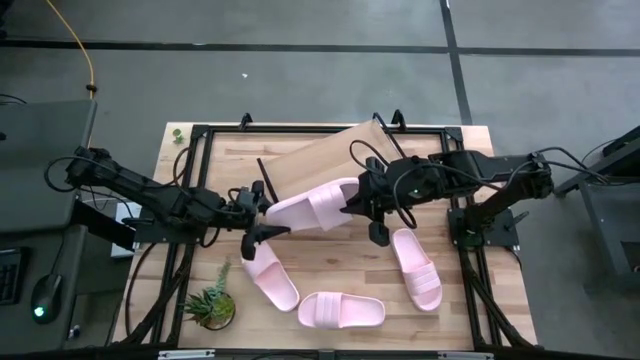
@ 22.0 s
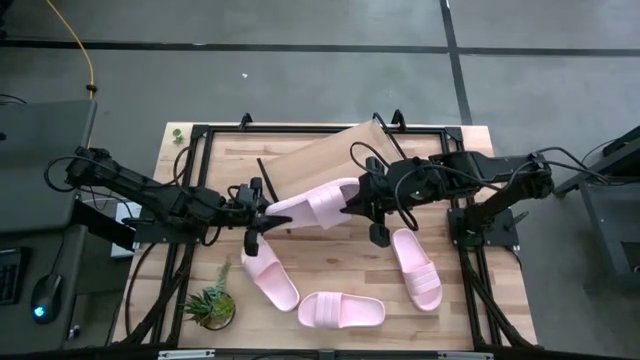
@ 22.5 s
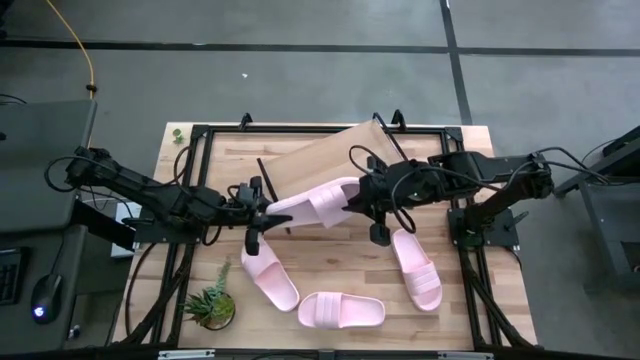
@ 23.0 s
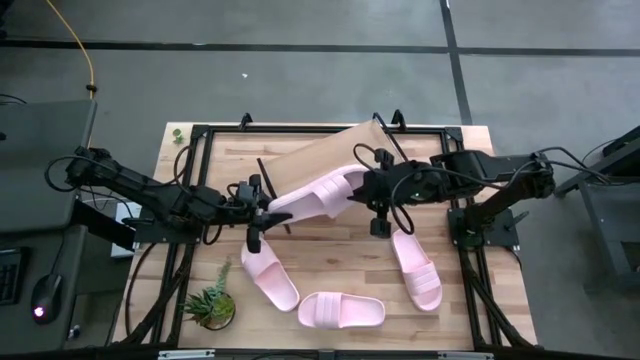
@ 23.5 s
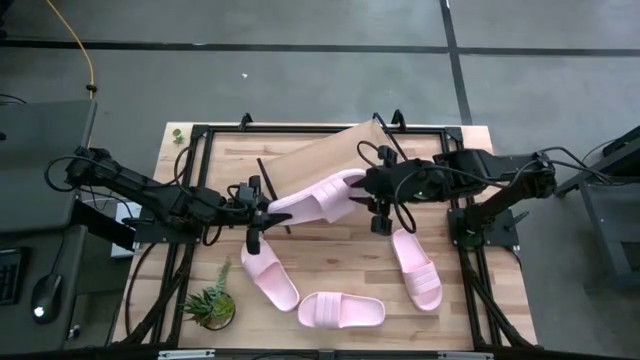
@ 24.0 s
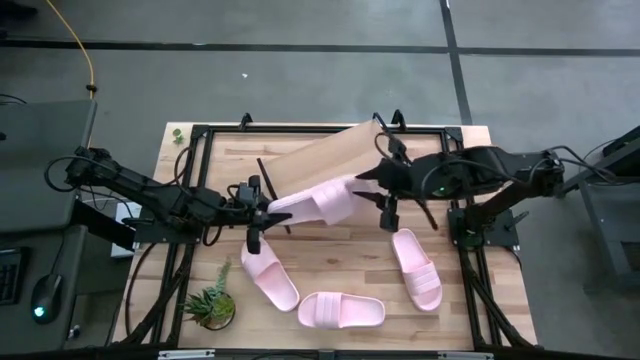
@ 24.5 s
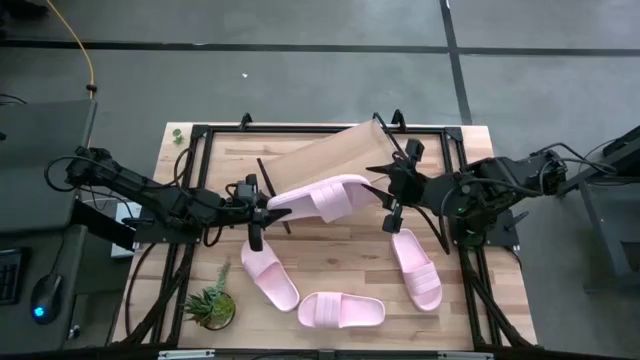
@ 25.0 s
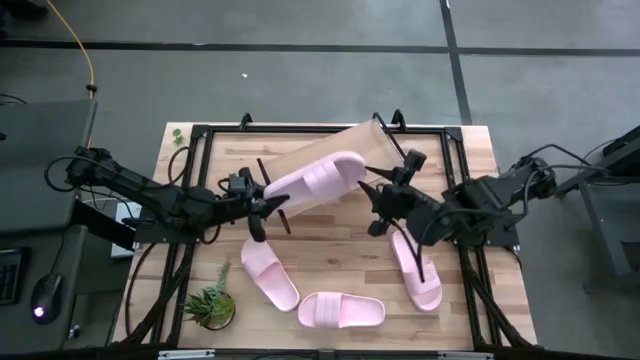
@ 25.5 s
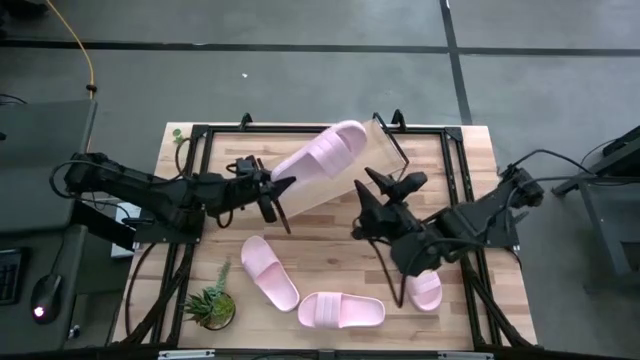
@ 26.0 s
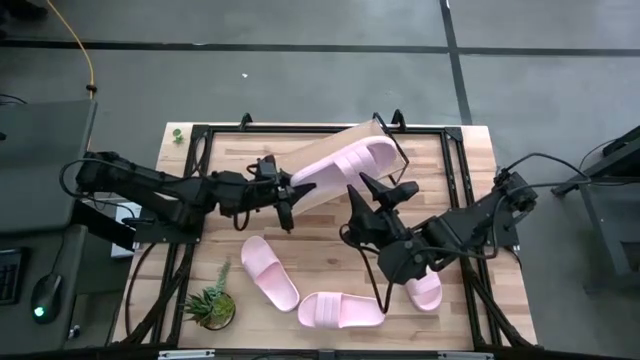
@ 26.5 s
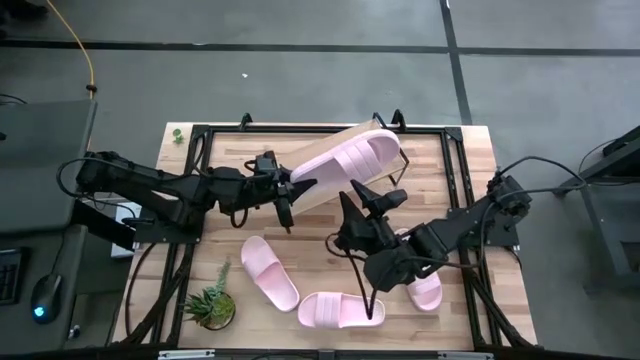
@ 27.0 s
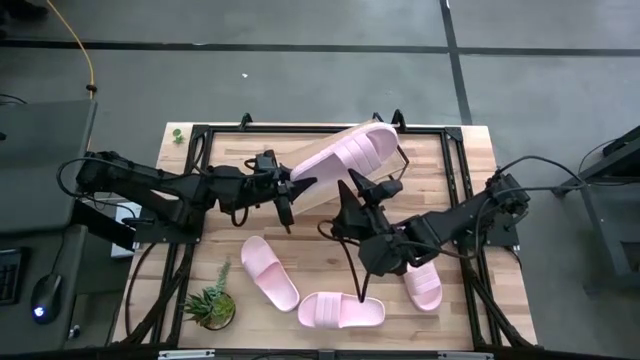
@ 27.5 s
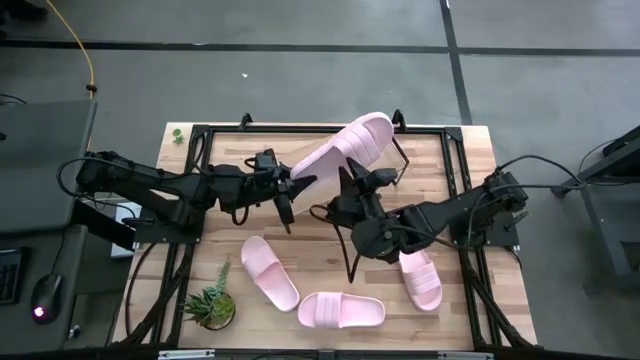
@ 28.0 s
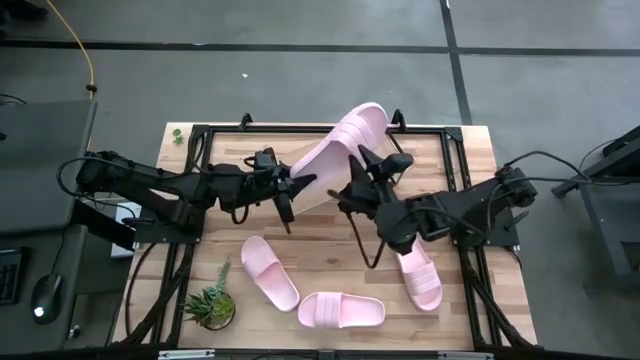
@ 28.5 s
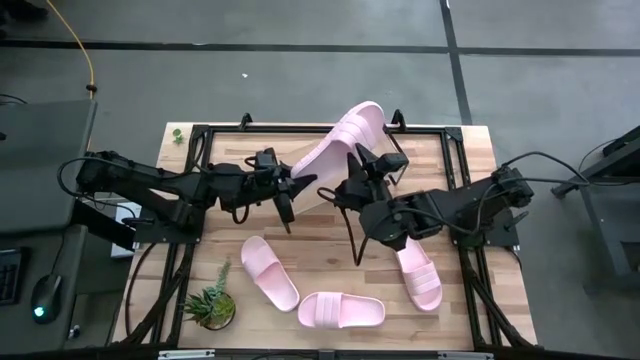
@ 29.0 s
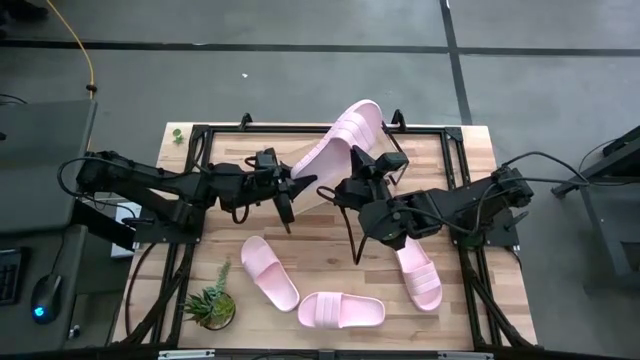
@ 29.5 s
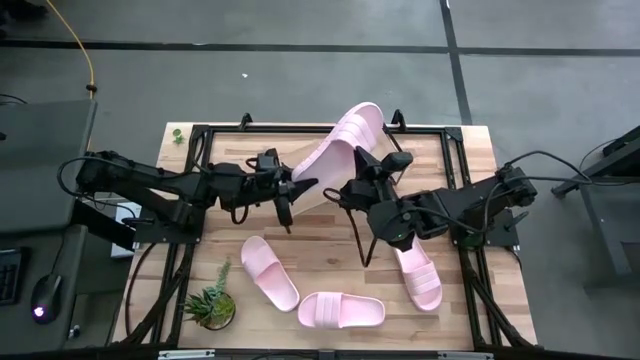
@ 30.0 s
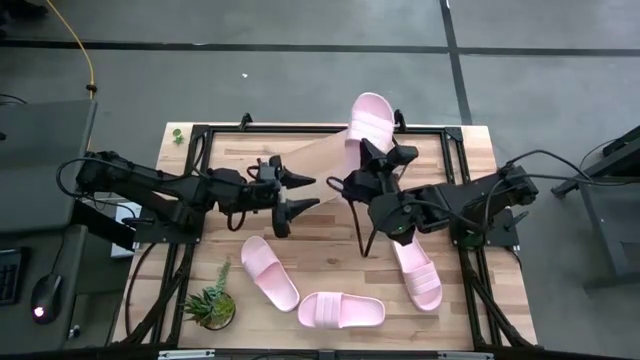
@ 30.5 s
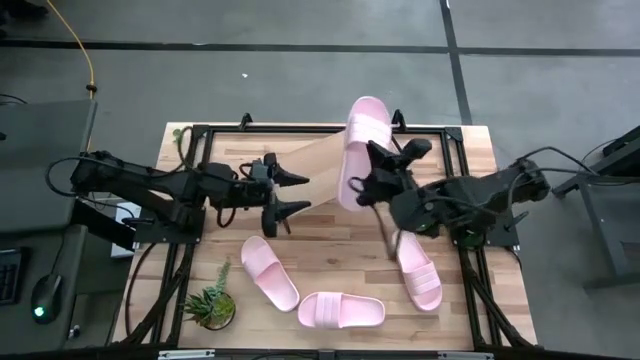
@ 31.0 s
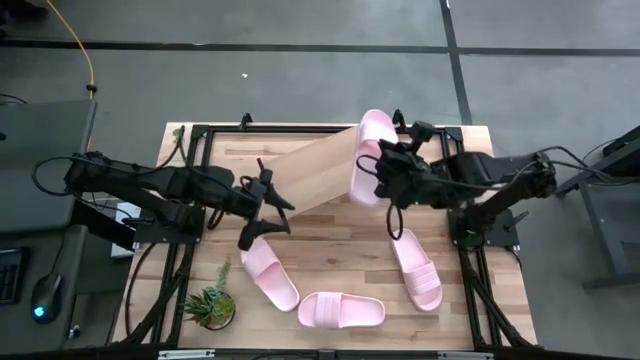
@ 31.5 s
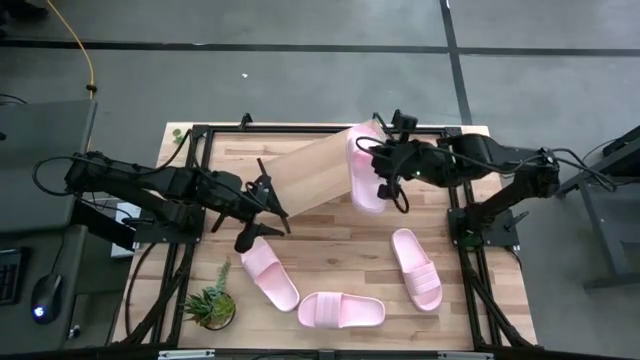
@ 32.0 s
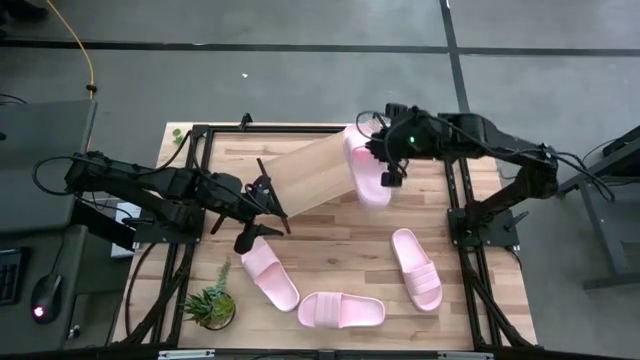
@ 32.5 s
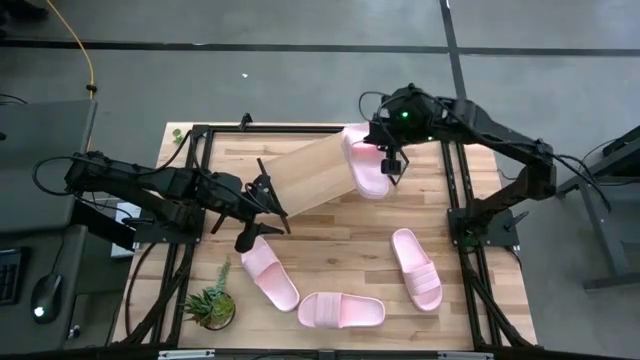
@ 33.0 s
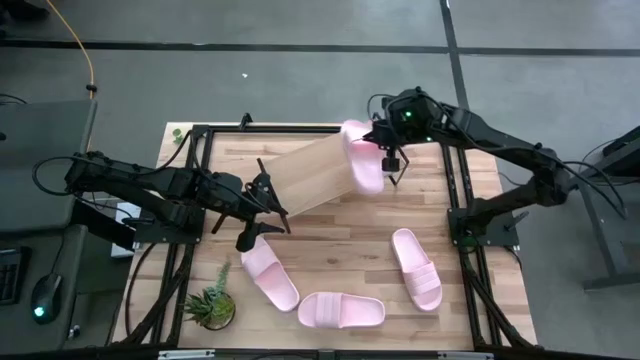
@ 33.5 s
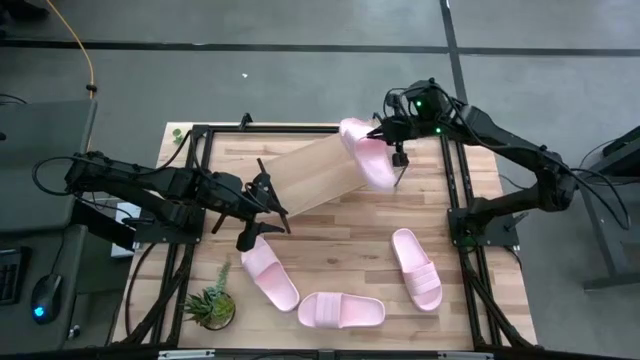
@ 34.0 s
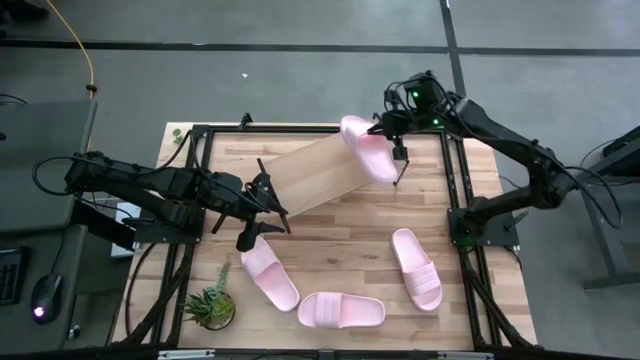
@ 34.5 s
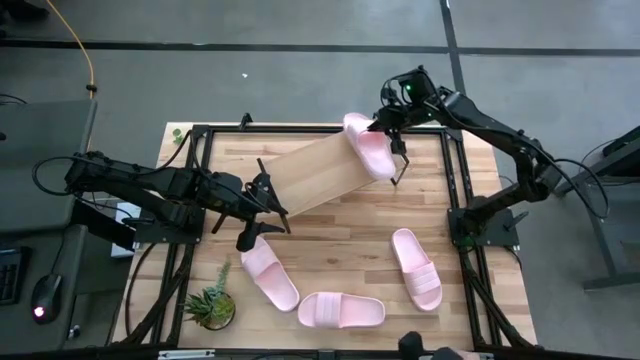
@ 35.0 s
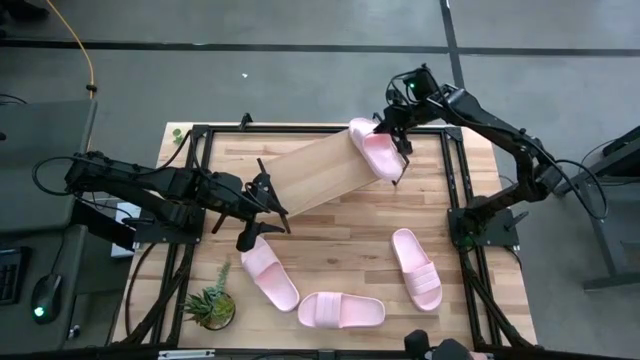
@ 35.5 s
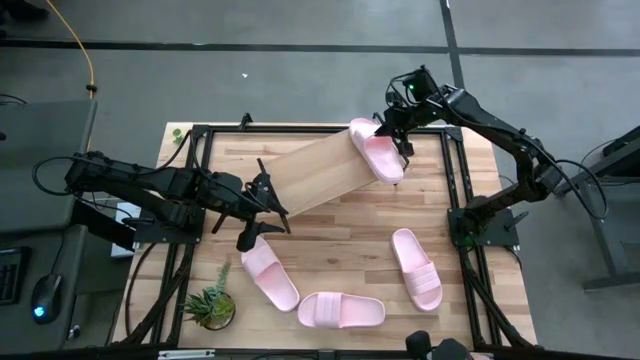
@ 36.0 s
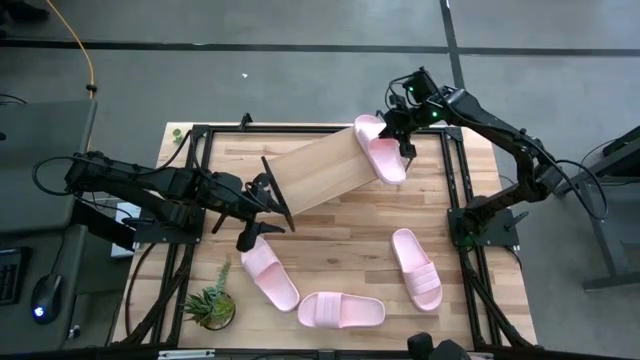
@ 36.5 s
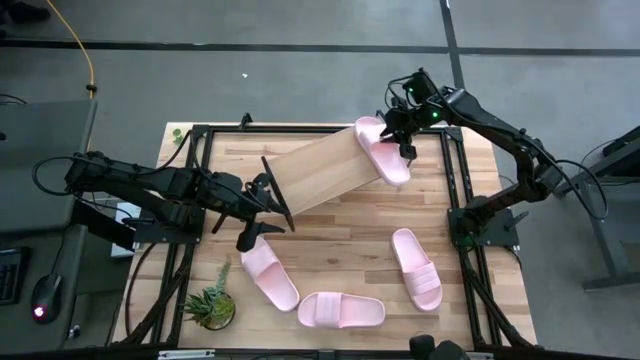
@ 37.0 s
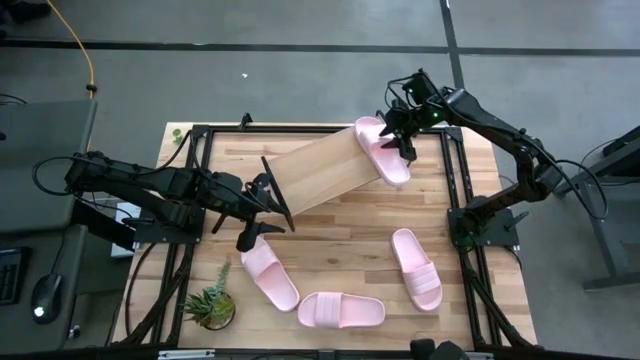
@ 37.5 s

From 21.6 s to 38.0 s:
Task: Pick and place slides into the shelf
Put the pink slide on the shelf

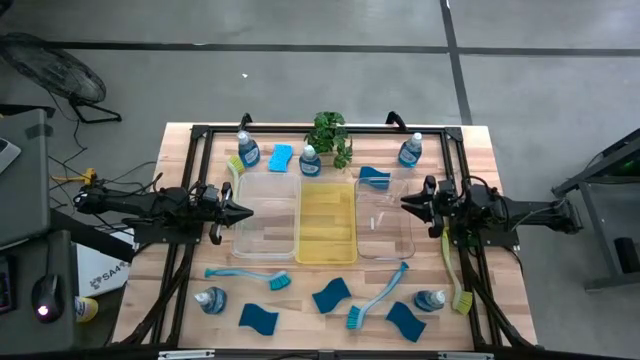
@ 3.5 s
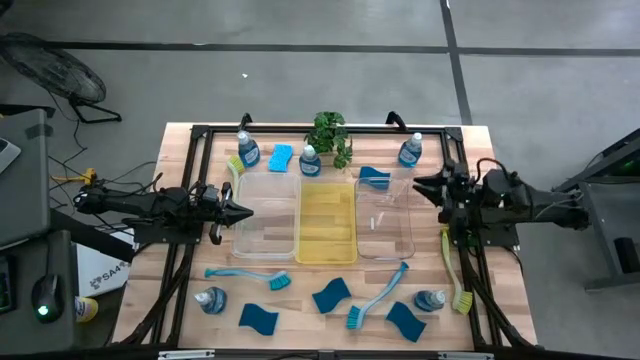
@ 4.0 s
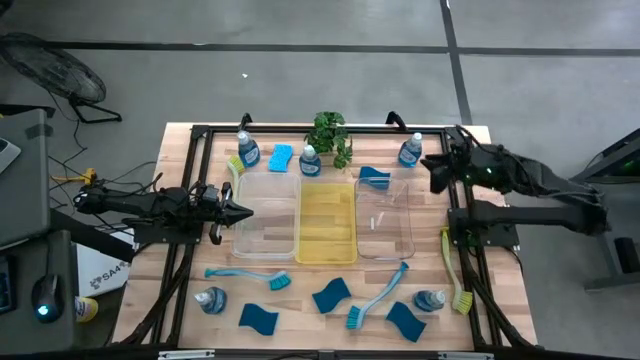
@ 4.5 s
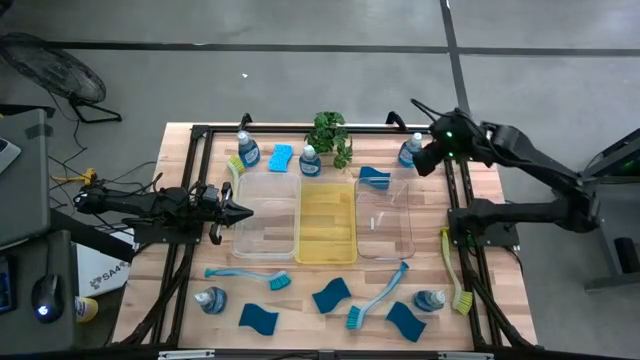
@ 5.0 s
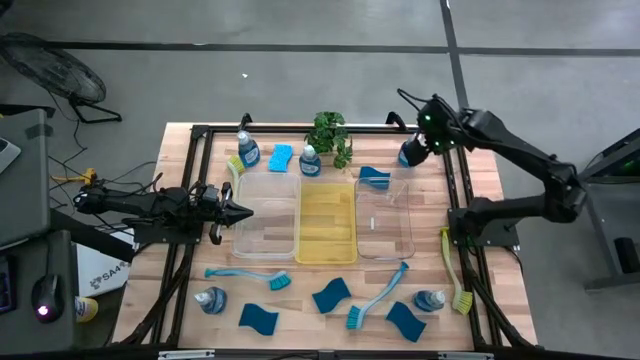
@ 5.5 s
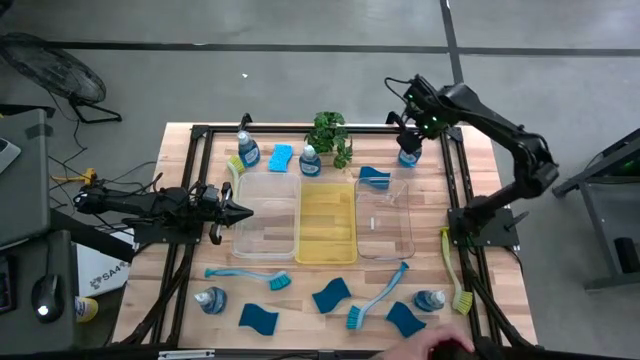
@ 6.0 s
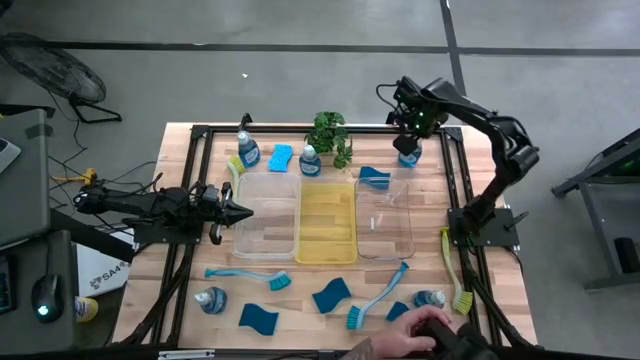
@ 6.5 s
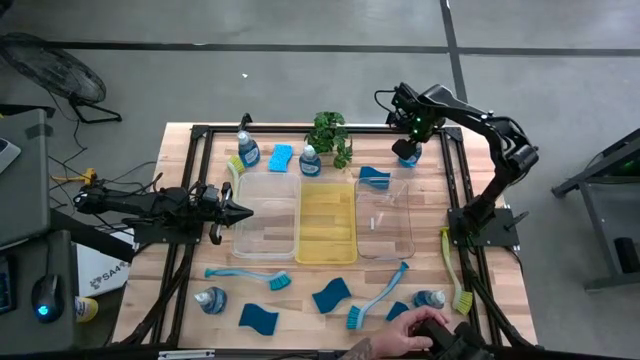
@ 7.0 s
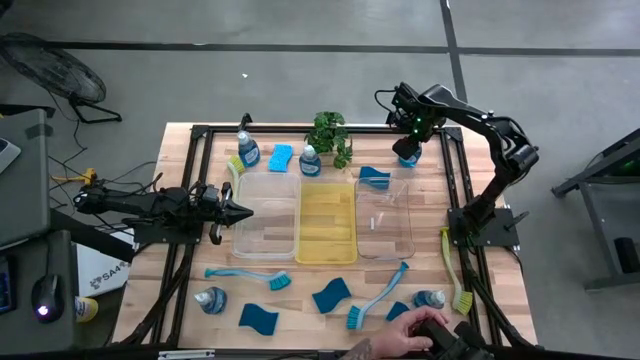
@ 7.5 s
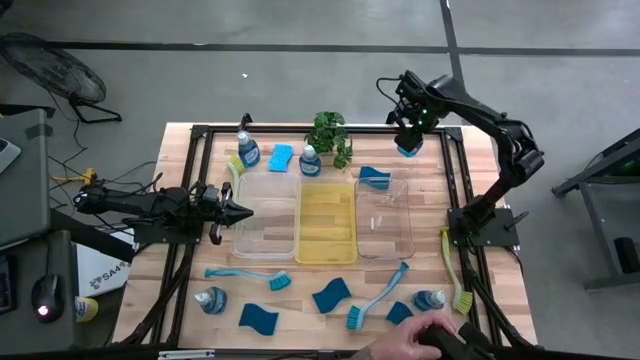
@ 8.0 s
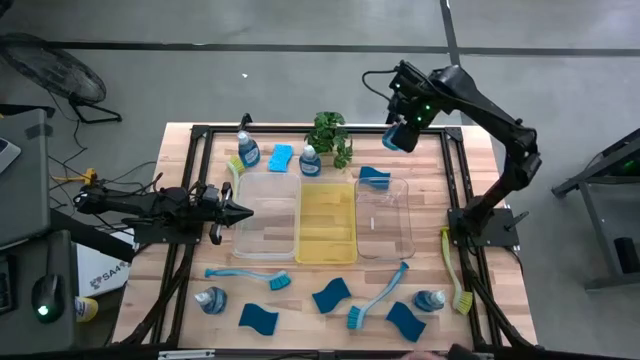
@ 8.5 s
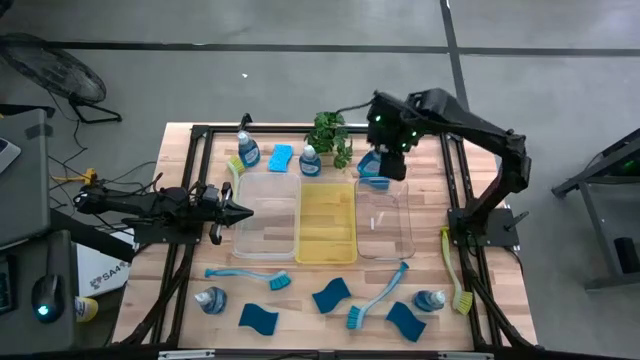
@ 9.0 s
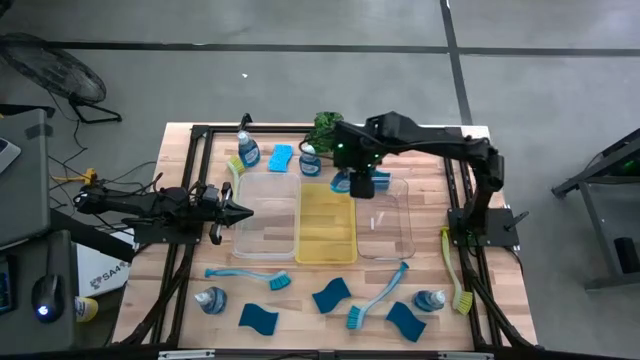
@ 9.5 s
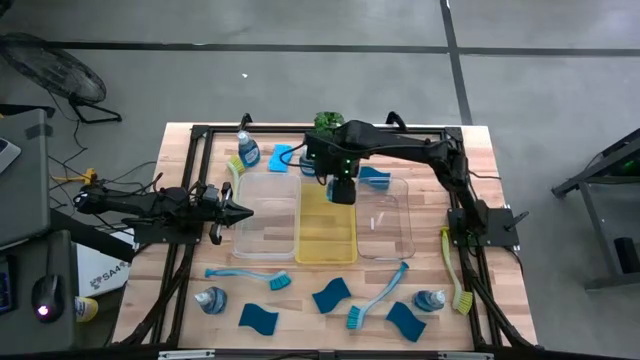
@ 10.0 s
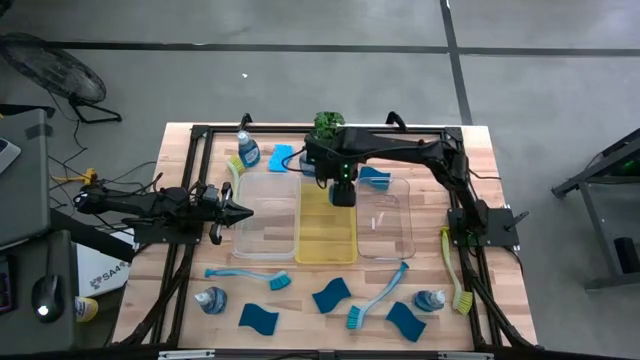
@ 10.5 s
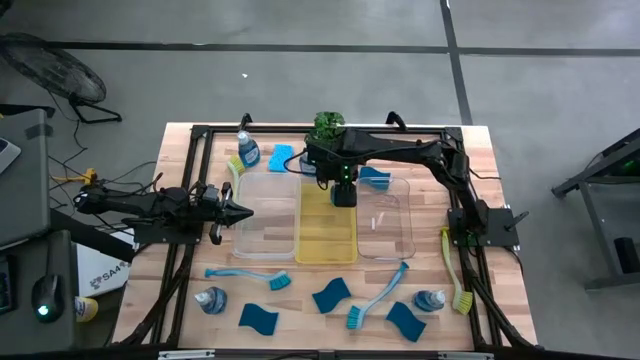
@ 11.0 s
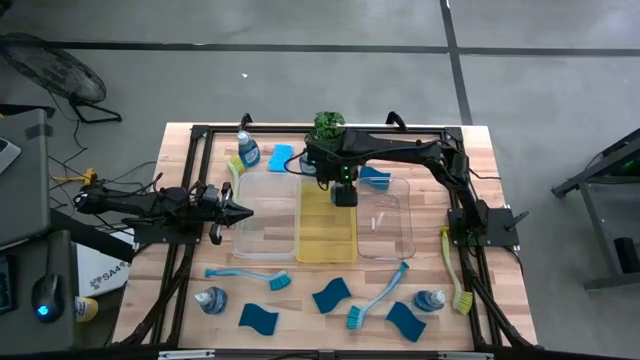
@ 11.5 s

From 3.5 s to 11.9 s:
Task: Pick & Place Kitchen Sink Supplies
Put the dishwashing liquid bottle into the yellow bin
